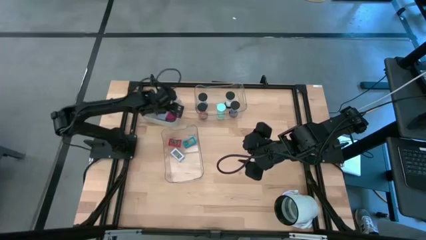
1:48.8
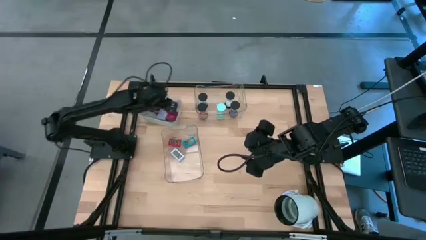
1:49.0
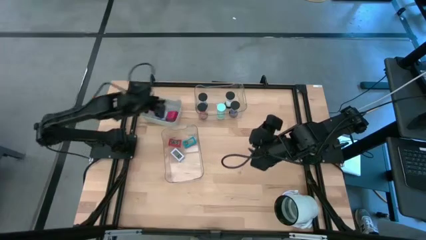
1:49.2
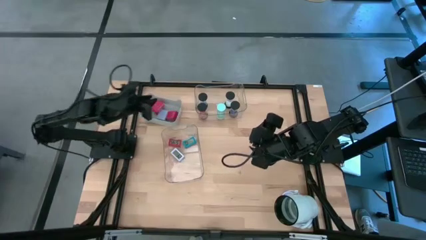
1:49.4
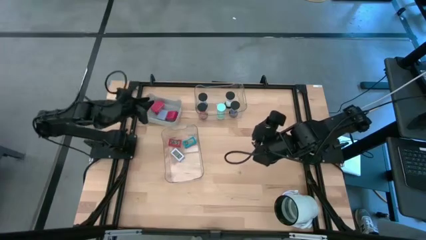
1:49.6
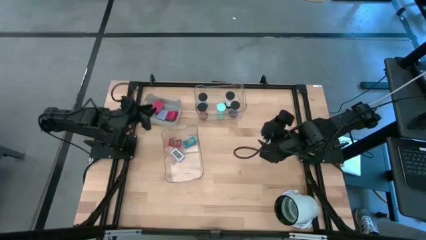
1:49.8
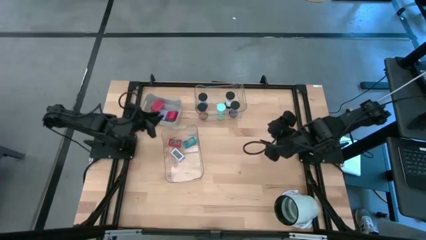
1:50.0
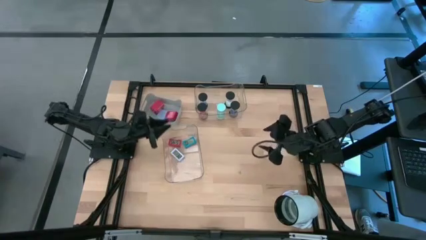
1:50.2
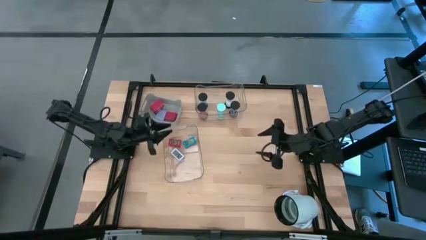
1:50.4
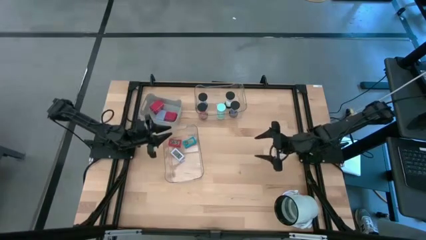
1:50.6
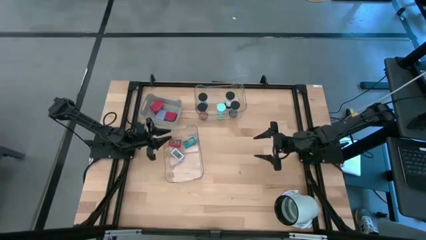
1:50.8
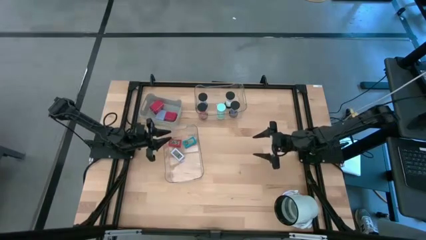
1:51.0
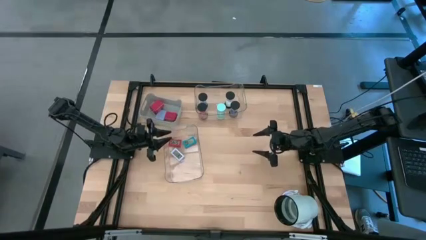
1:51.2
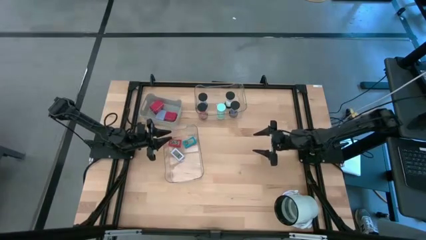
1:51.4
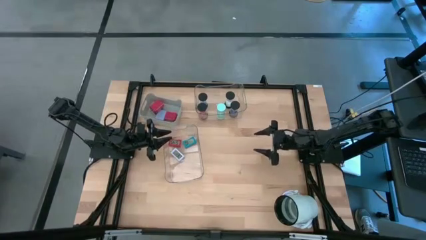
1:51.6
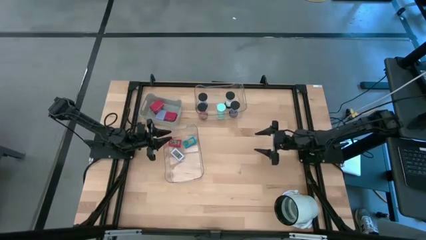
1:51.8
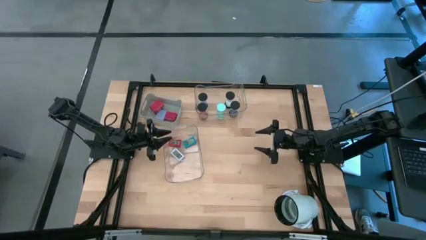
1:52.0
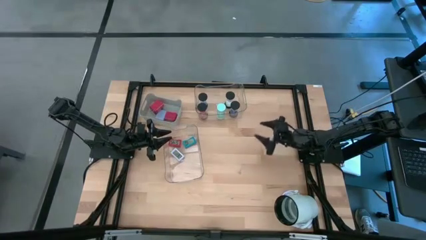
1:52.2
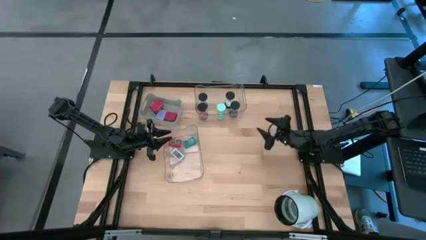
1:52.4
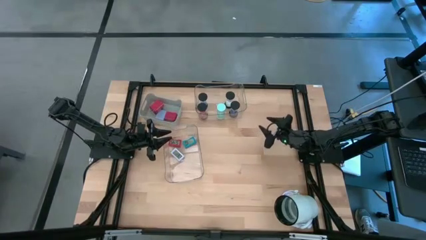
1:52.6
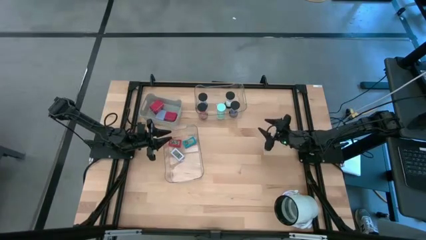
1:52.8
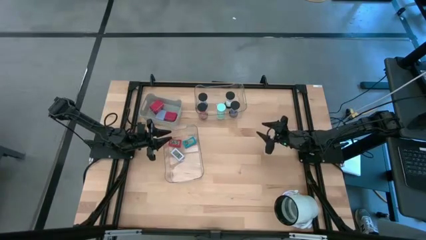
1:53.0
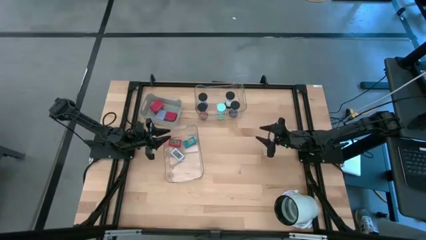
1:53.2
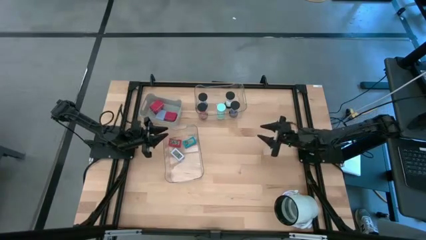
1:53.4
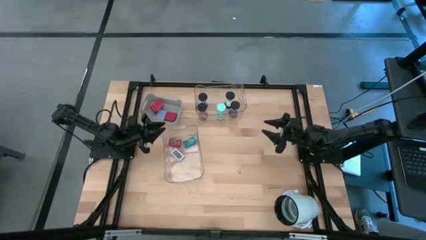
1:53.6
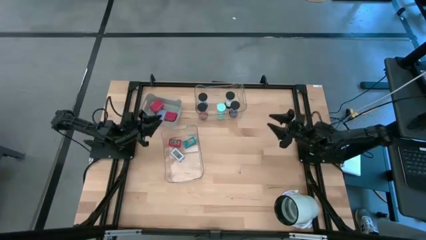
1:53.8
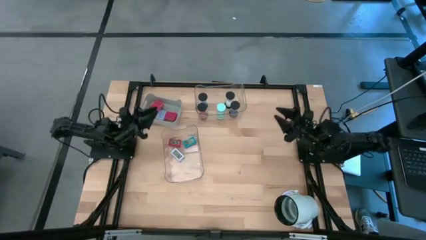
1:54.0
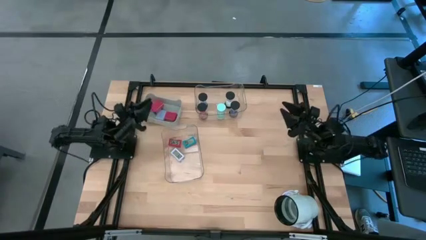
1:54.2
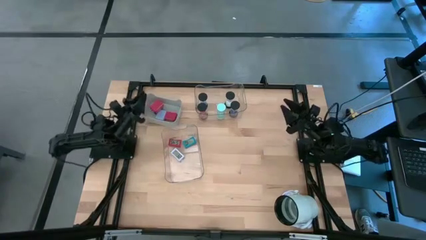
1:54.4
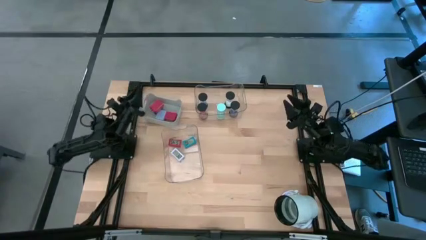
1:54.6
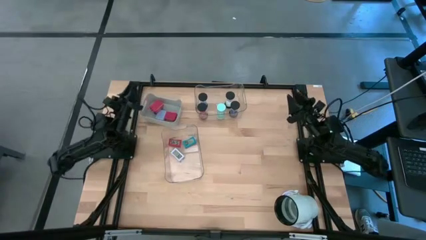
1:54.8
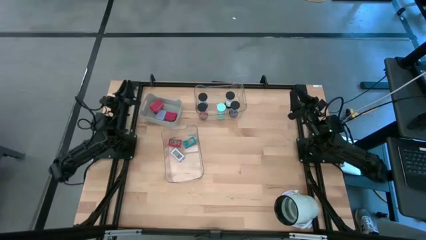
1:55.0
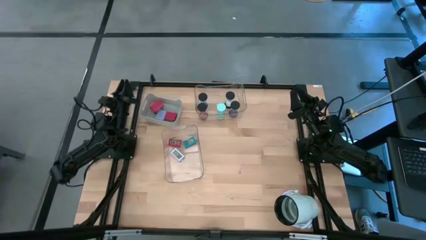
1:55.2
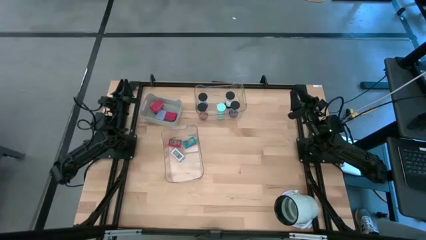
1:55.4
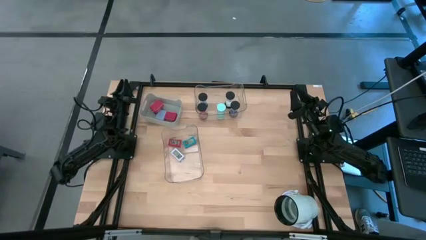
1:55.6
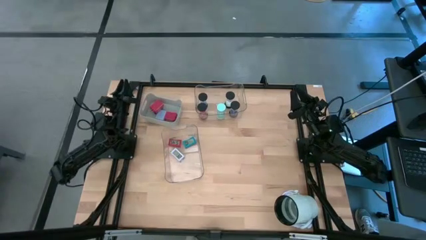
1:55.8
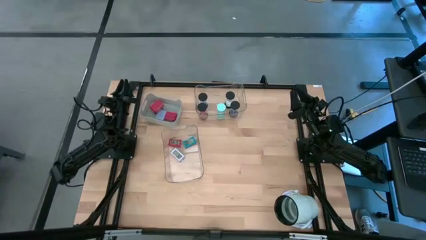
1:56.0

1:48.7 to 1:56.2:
Task: Pick & Place Office items
Return to Home Position

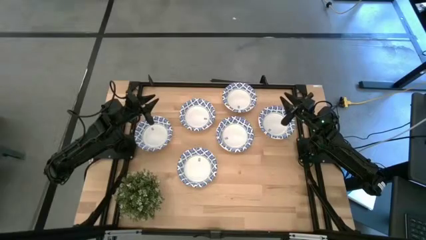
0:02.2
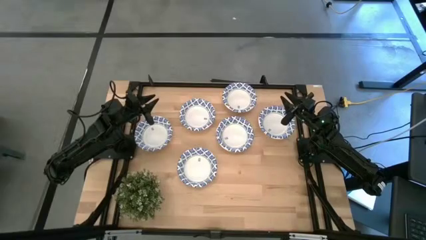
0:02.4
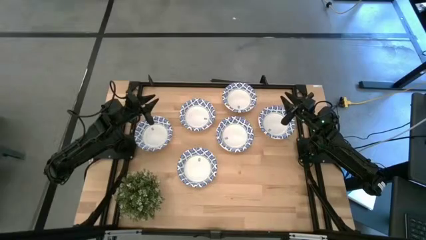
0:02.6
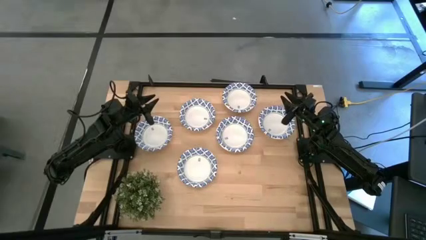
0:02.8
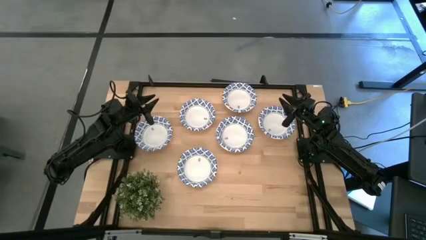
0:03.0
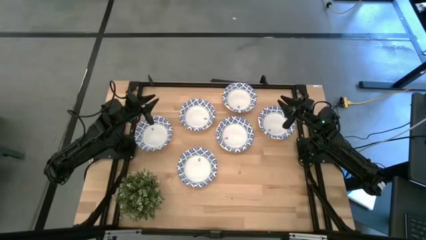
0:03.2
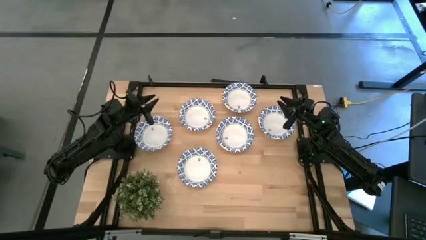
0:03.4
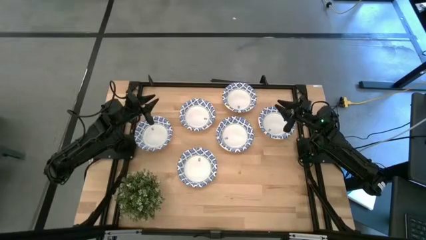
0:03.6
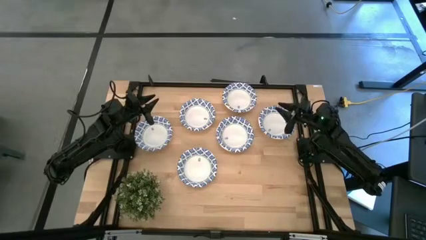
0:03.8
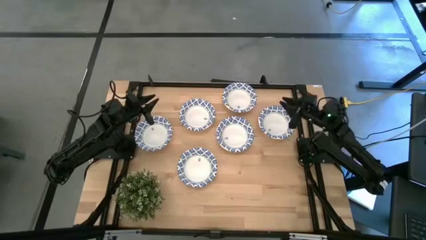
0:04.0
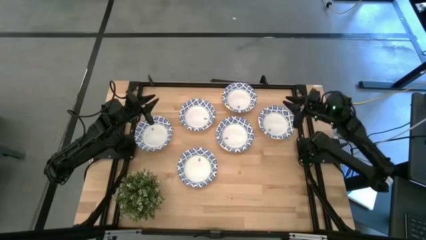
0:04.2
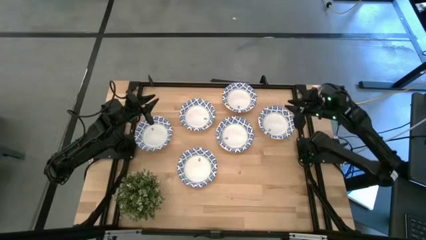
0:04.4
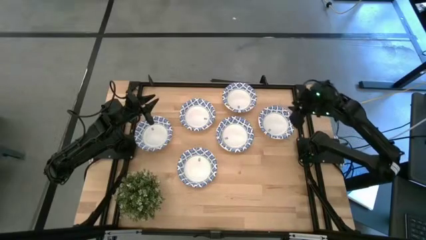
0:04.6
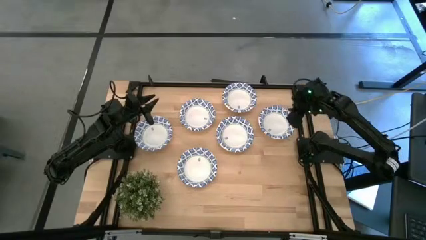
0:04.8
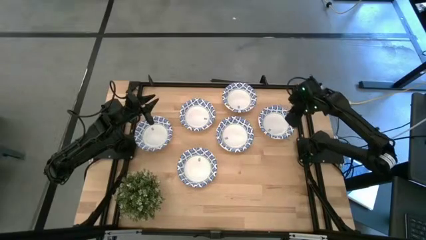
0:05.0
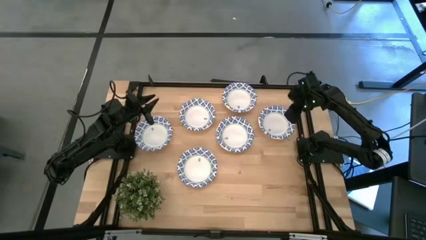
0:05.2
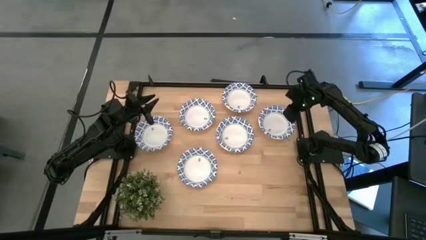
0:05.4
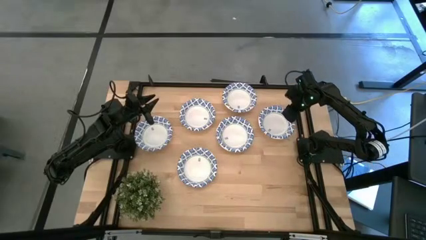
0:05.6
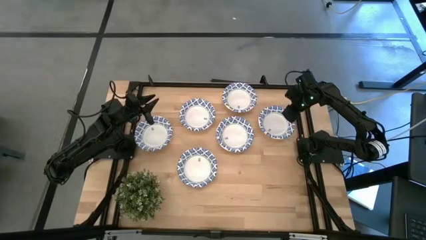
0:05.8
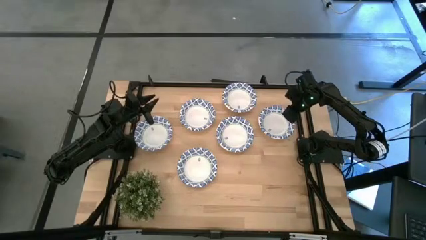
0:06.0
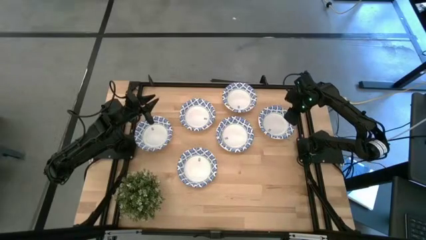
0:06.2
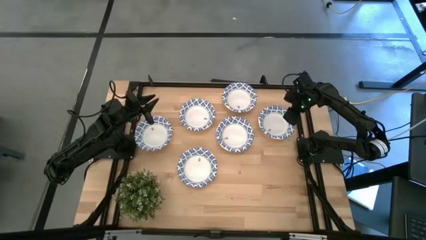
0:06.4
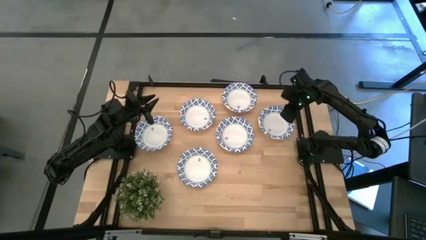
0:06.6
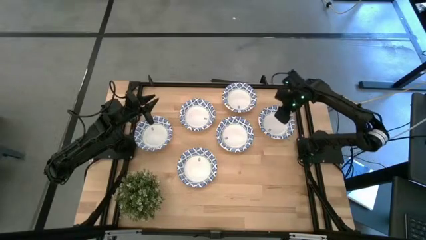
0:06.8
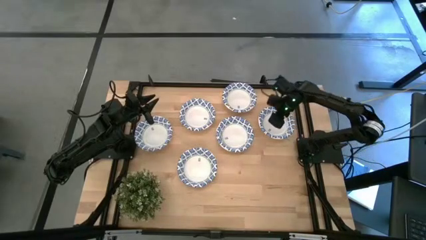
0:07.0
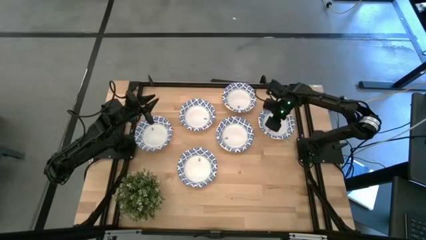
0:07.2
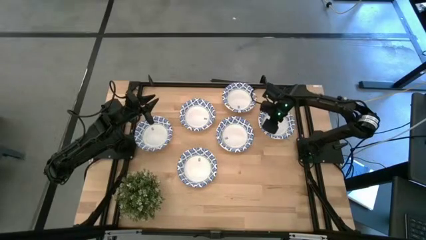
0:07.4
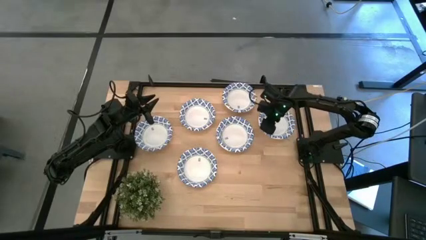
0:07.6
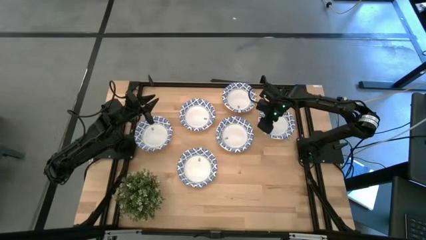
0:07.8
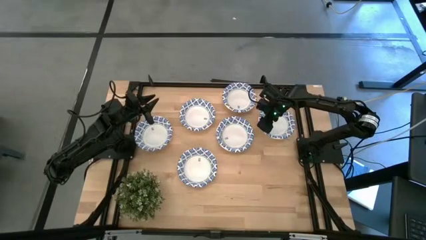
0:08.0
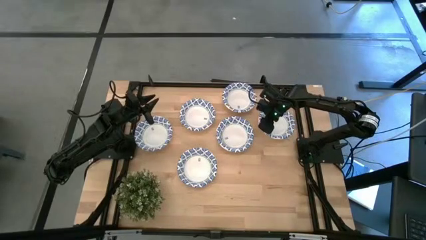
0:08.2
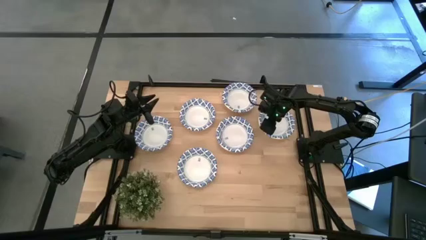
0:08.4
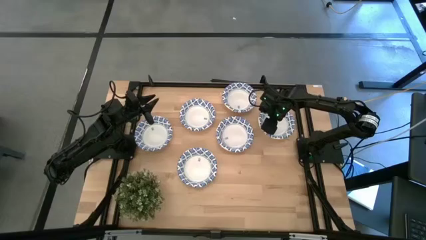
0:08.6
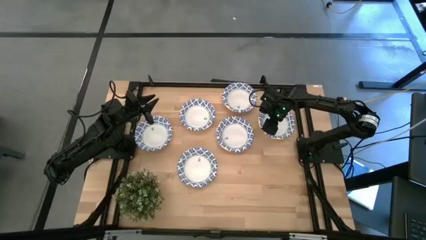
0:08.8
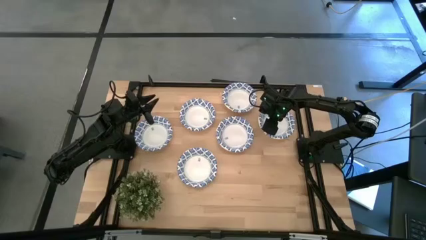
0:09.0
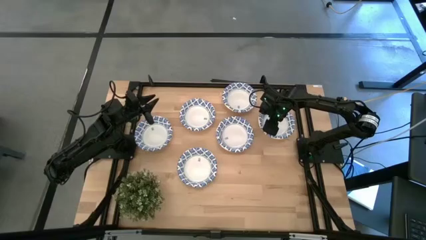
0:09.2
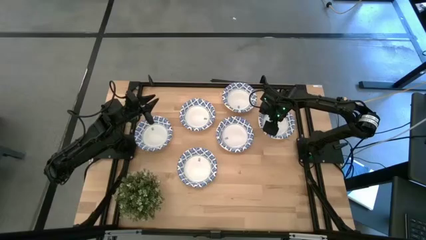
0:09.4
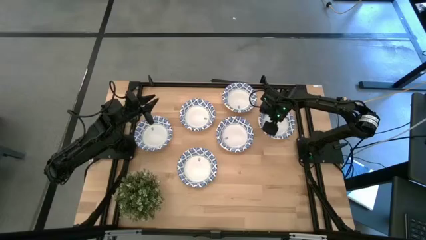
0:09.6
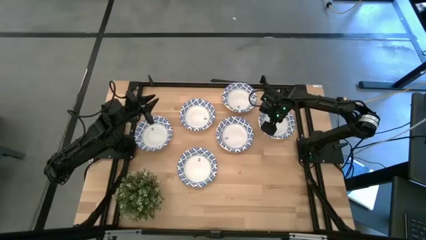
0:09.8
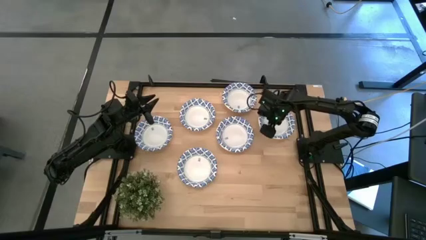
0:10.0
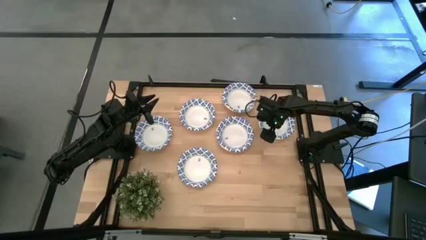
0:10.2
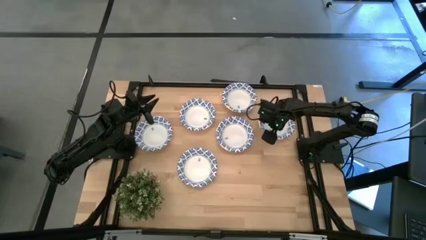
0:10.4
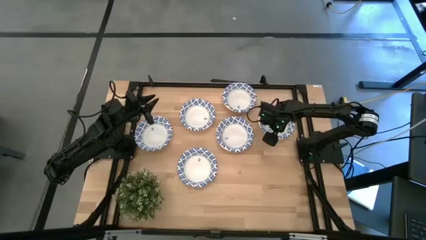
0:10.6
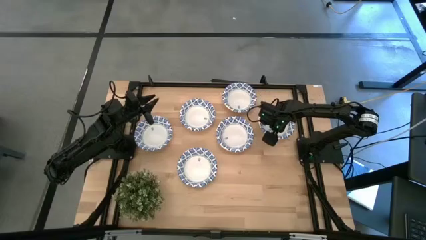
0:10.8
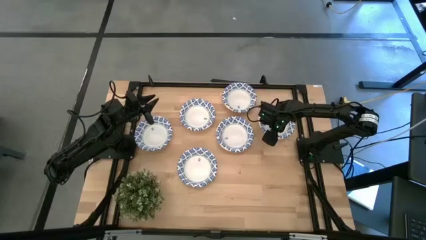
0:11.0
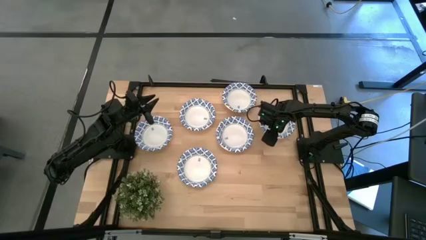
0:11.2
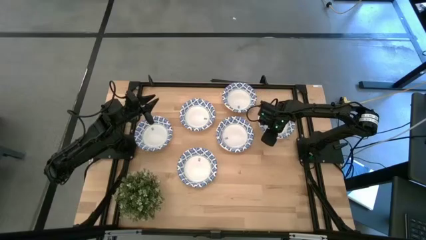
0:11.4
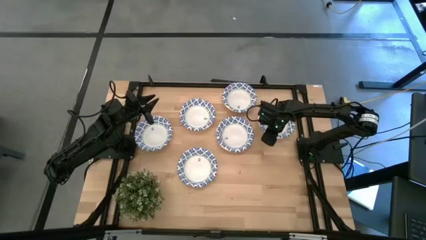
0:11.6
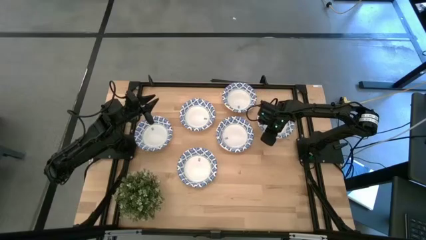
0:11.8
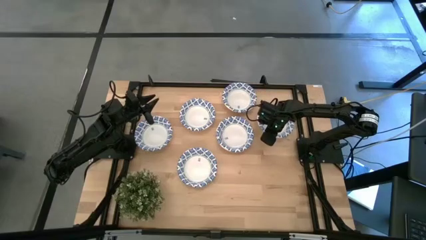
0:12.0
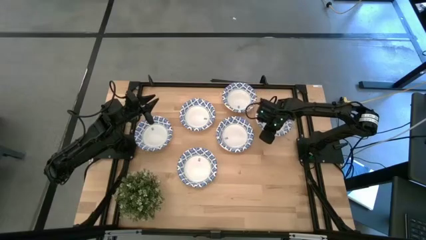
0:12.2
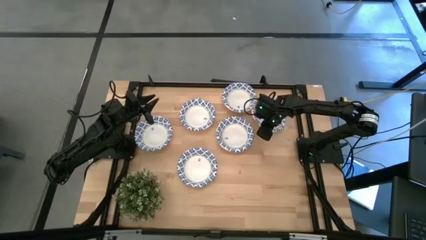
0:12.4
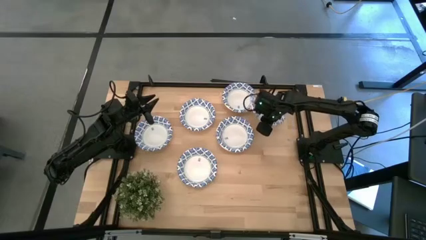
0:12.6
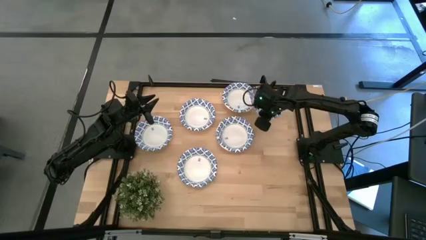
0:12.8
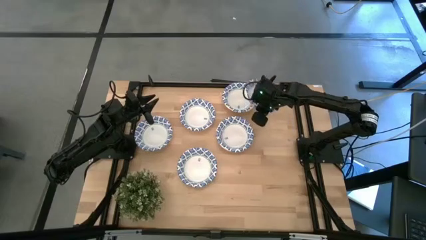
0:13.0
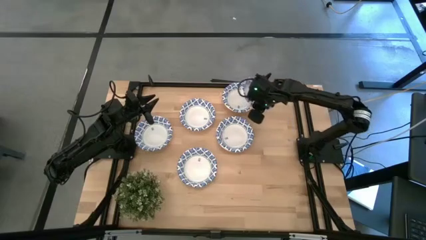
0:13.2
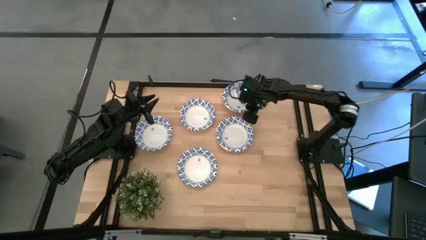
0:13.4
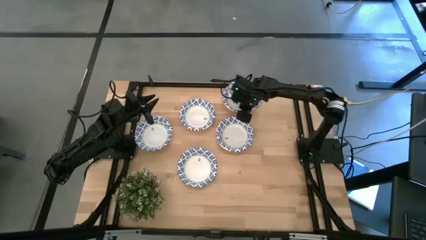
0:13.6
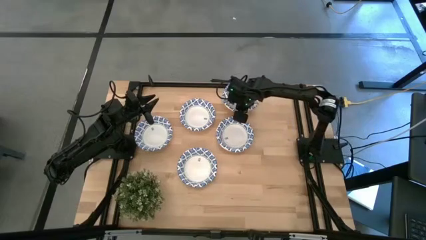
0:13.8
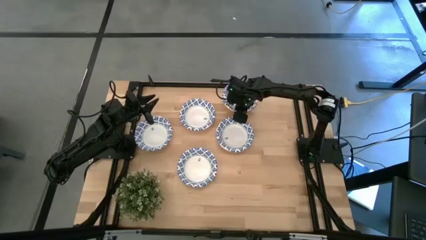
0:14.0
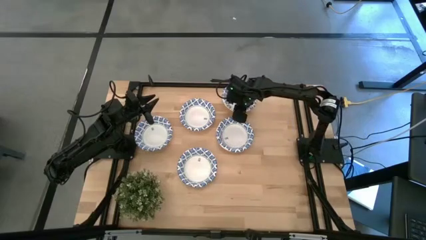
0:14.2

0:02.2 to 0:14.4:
Task: Nest bowls inside each other
Stack the right bowl on the top bowl
